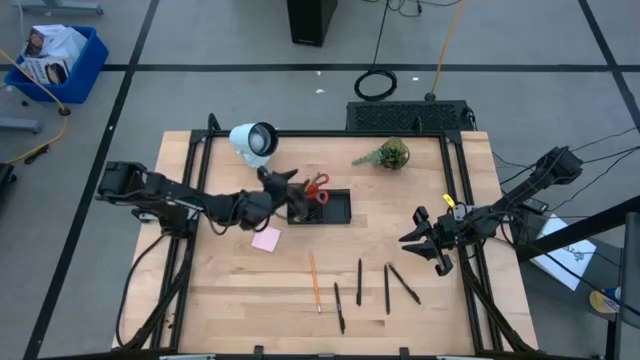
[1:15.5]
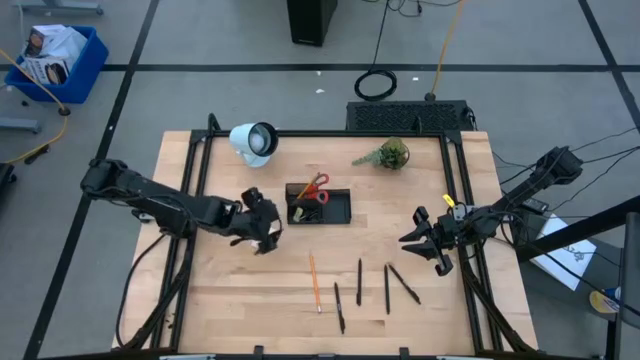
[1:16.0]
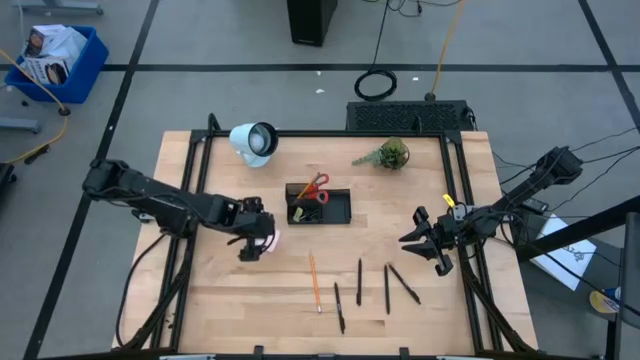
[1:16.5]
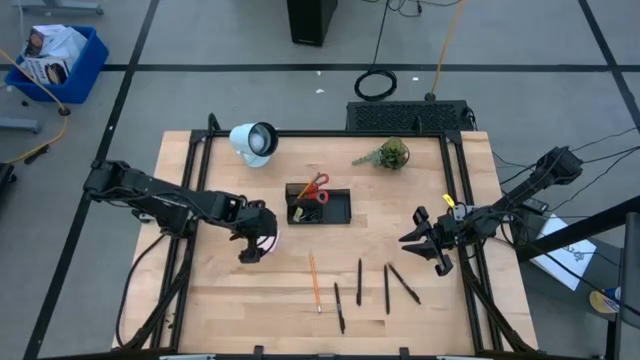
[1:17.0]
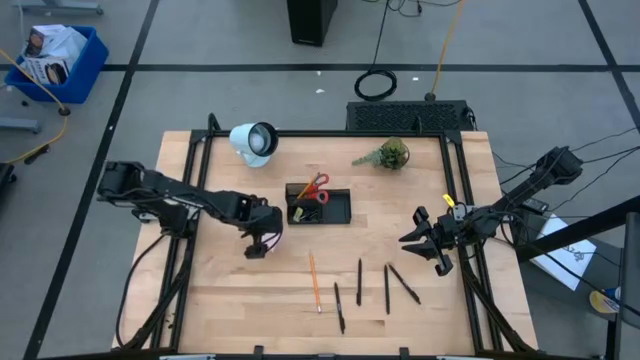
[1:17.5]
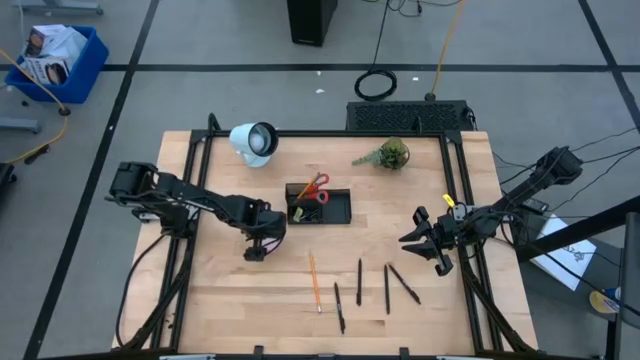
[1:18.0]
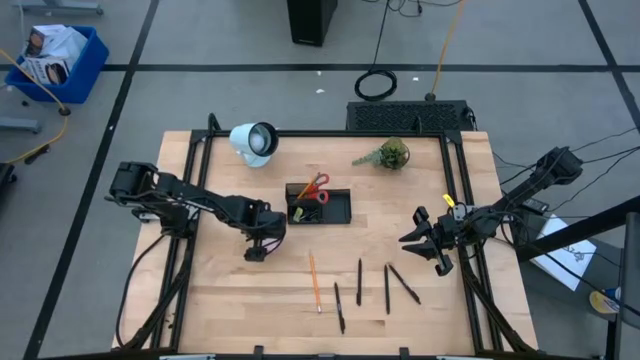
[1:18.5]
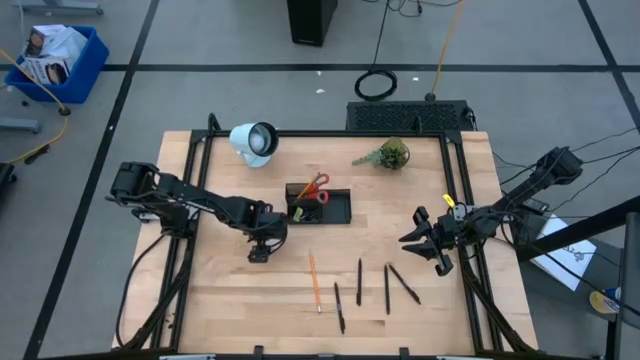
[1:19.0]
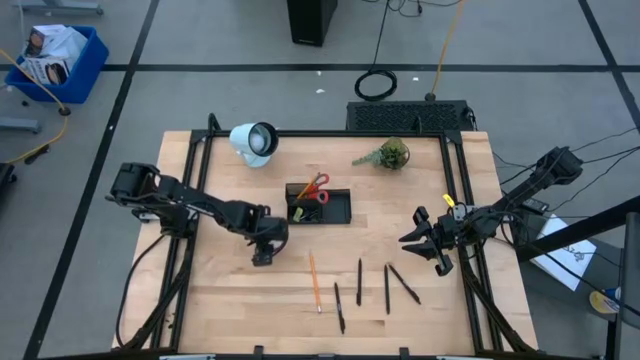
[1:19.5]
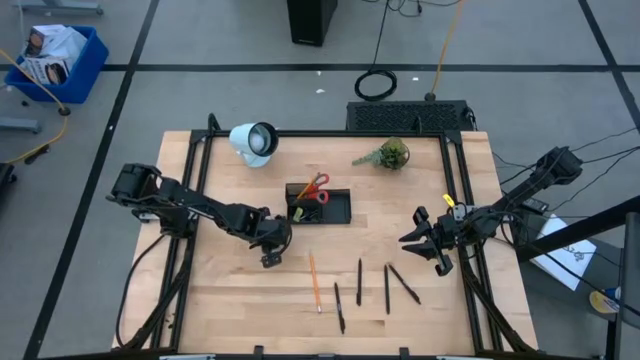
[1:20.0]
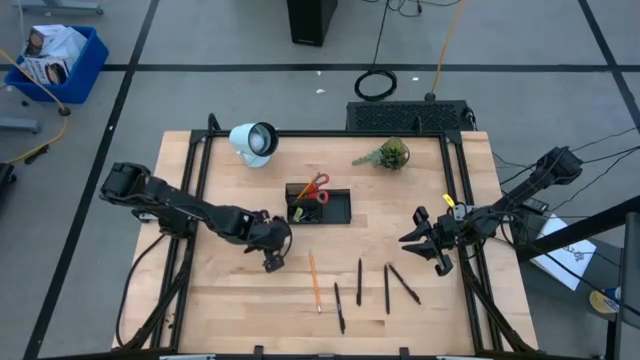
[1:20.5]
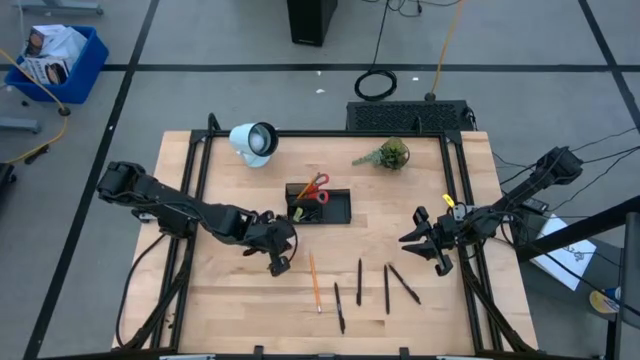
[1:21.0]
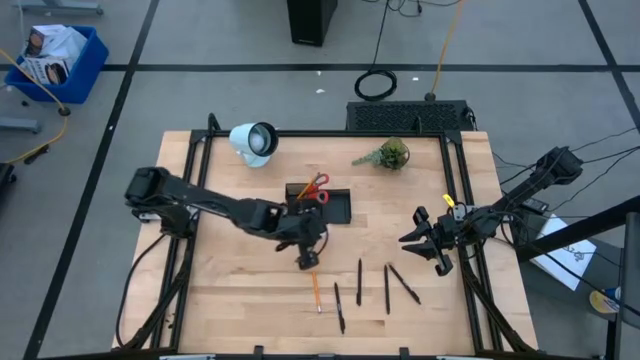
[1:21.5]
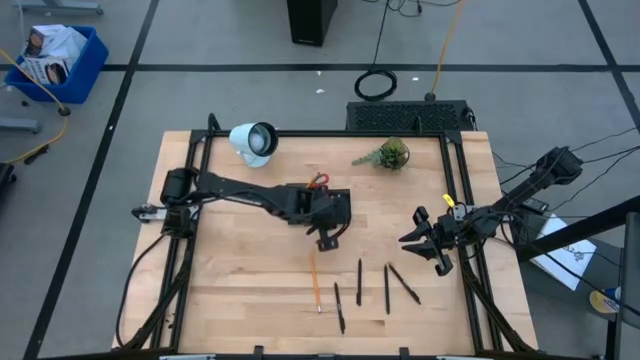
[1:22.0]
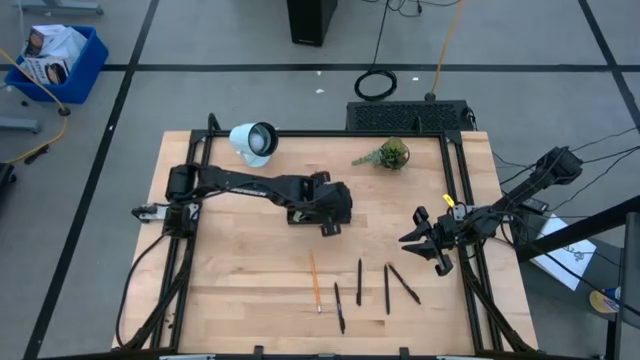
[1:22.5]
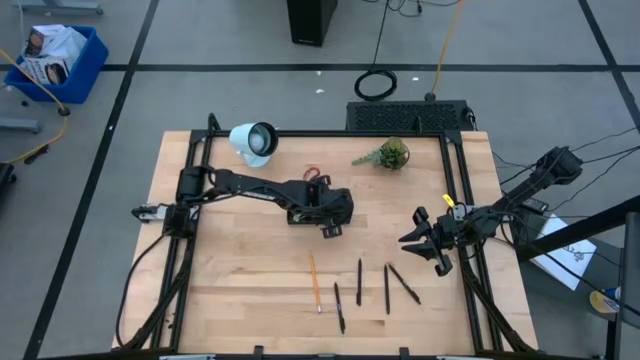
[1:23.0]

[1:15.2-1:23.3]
Task: Pick and place office supplies into organizer
Put the pink sticky notes into the black desk organizer

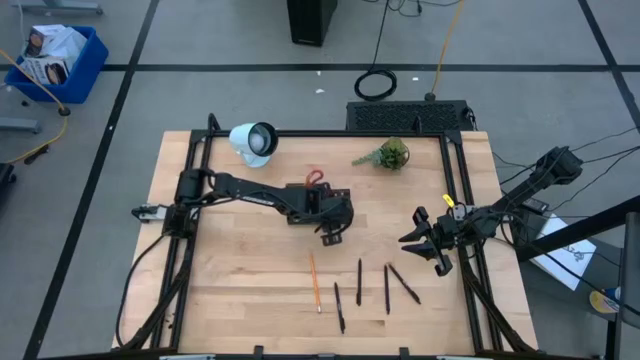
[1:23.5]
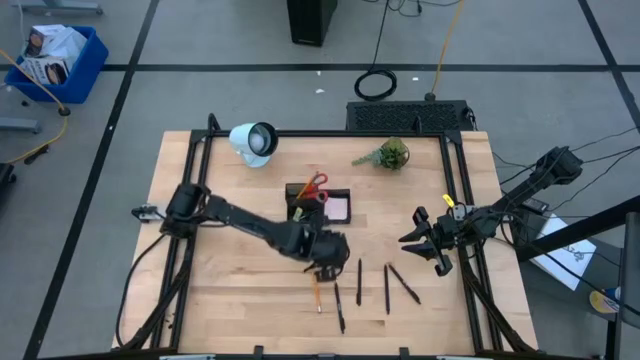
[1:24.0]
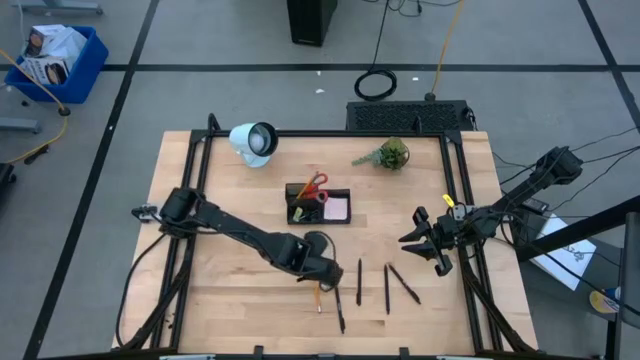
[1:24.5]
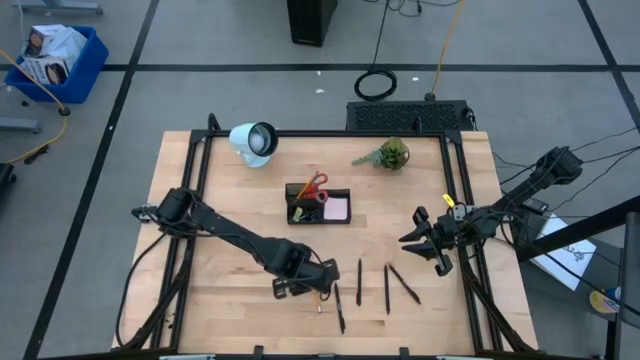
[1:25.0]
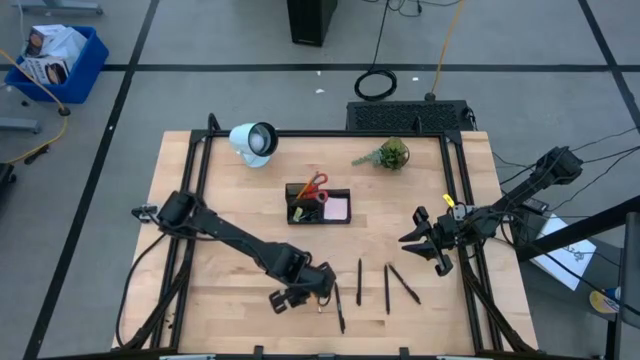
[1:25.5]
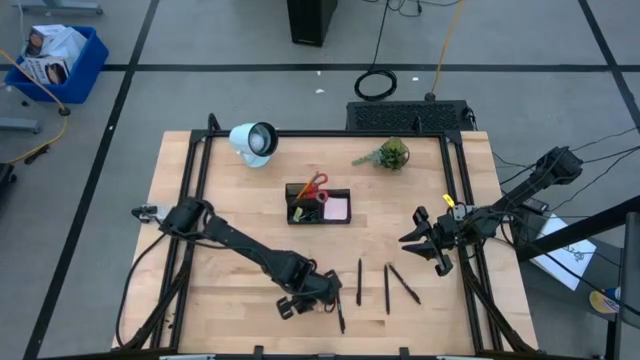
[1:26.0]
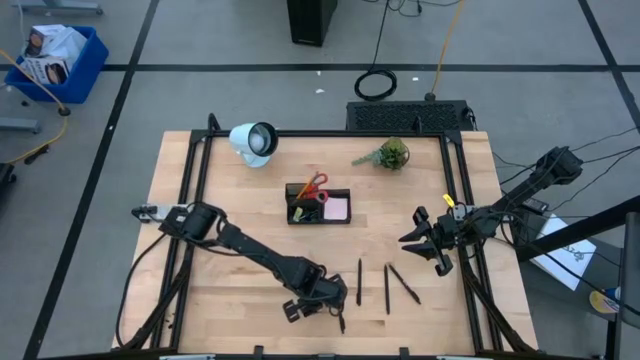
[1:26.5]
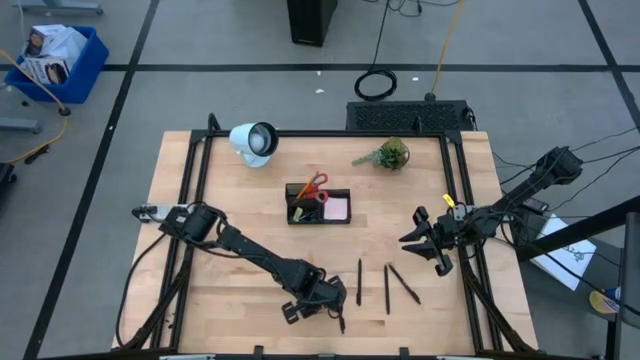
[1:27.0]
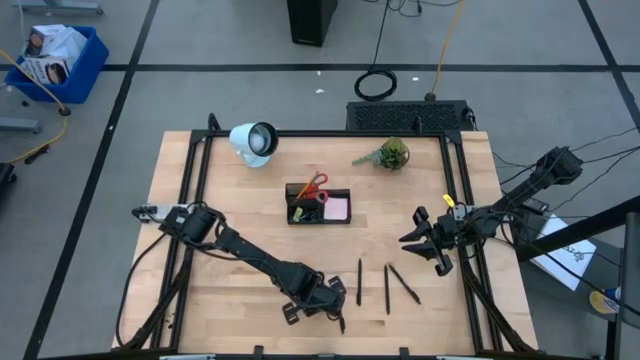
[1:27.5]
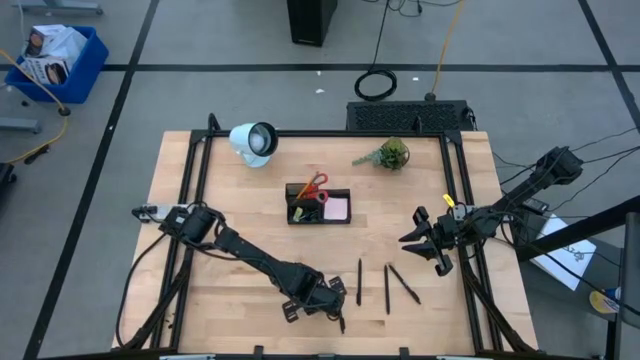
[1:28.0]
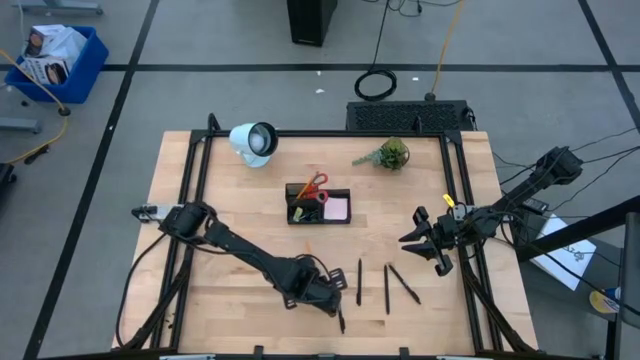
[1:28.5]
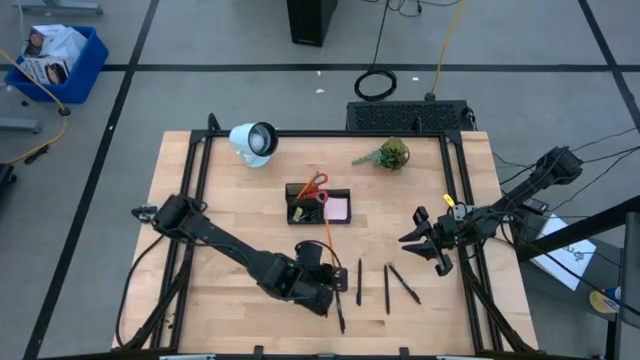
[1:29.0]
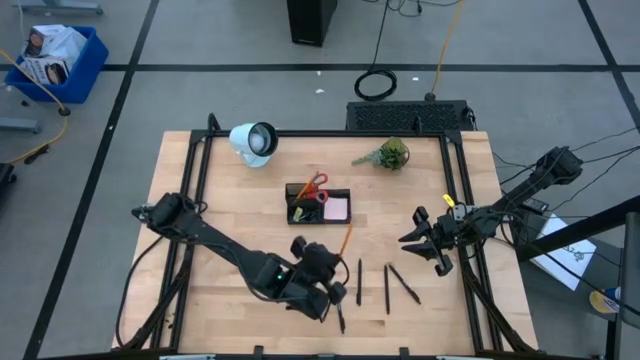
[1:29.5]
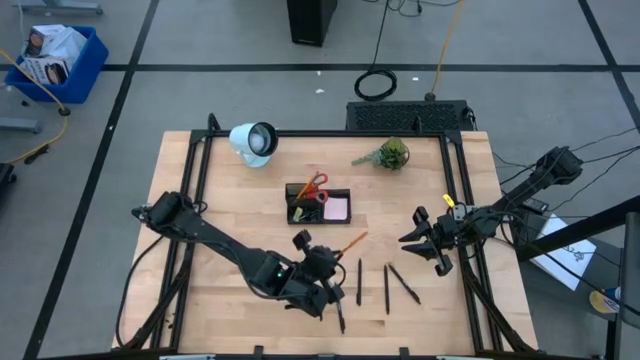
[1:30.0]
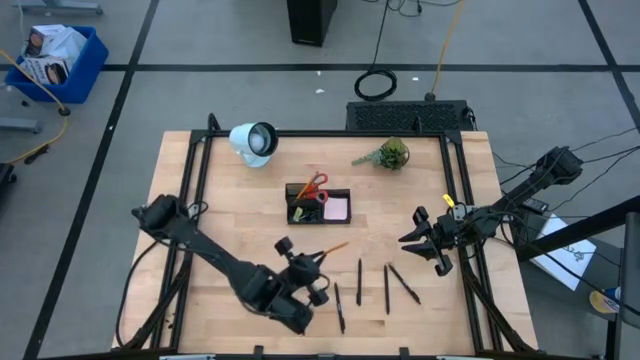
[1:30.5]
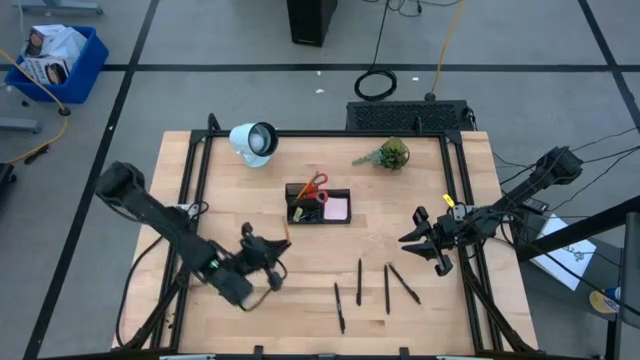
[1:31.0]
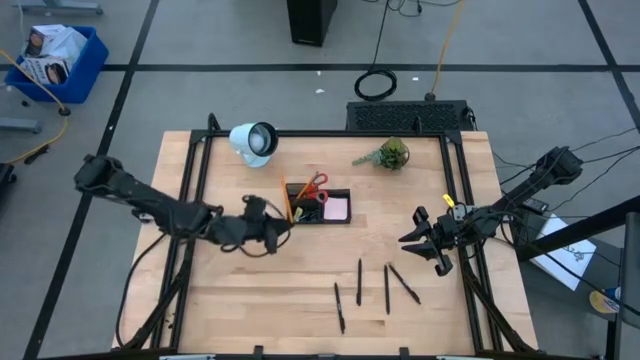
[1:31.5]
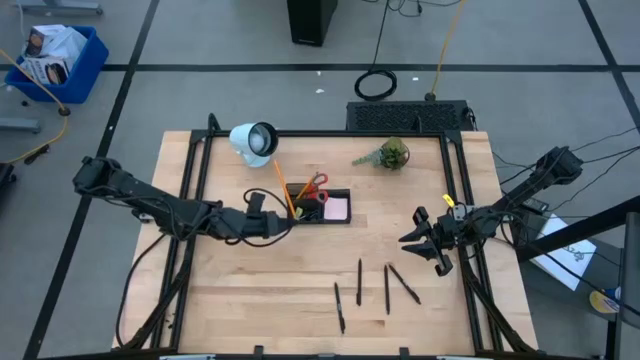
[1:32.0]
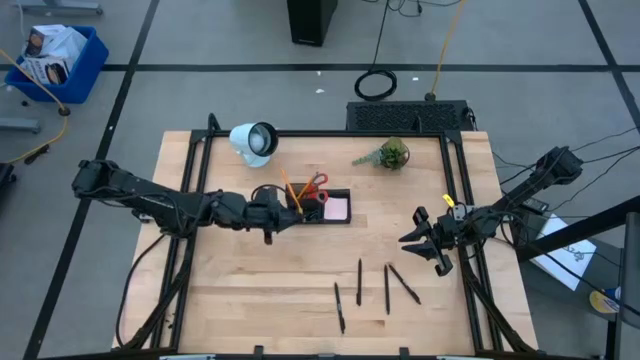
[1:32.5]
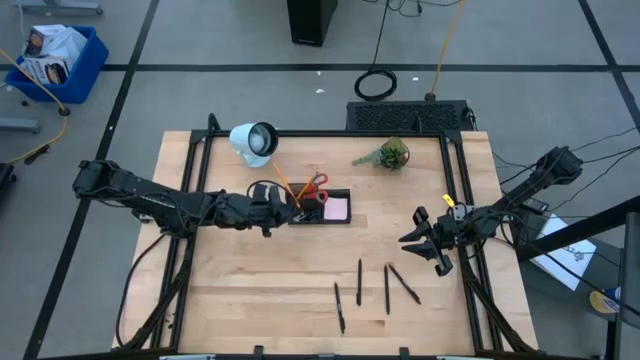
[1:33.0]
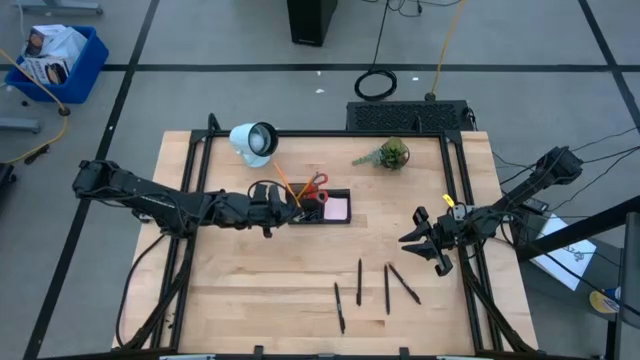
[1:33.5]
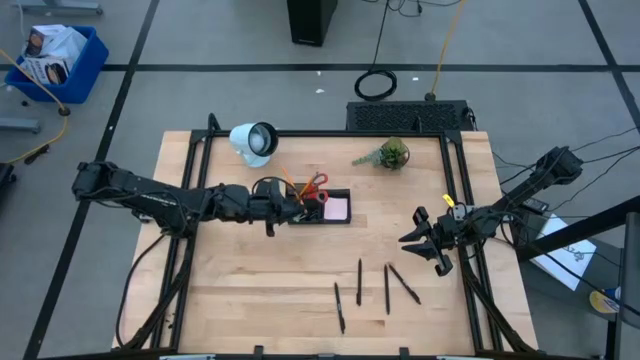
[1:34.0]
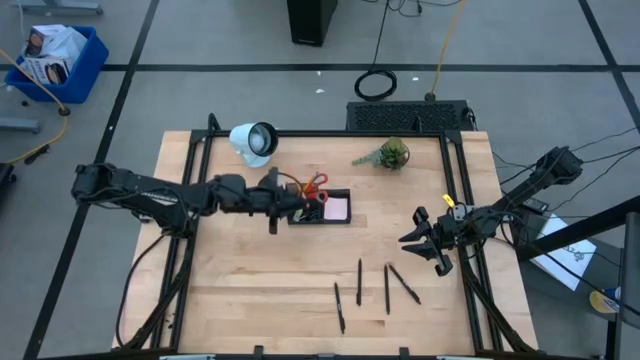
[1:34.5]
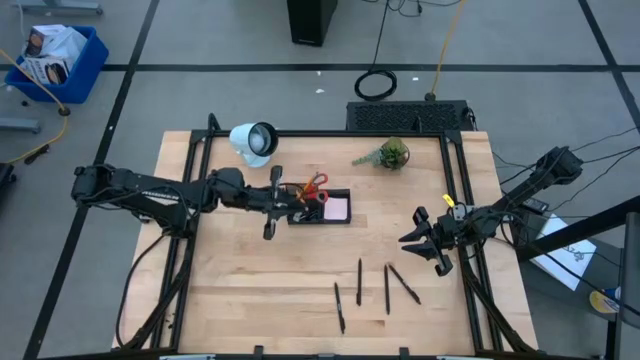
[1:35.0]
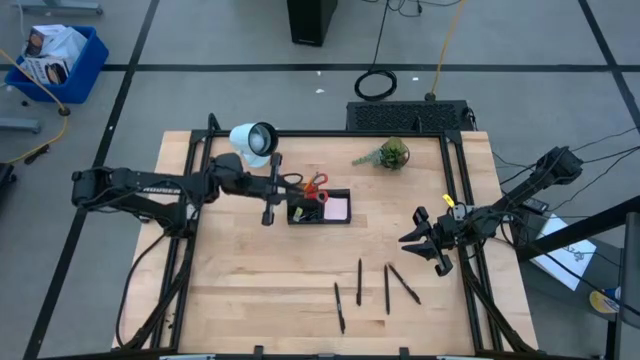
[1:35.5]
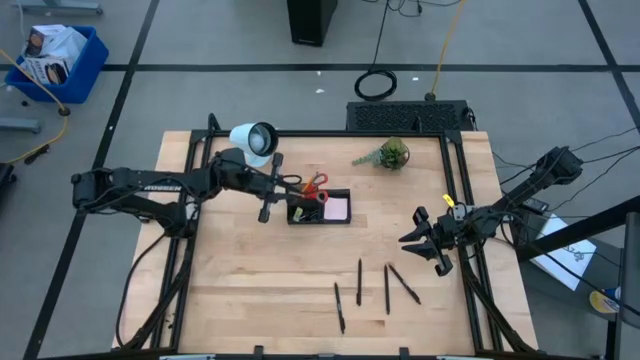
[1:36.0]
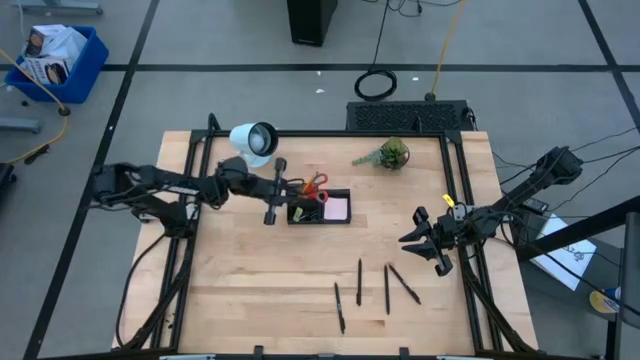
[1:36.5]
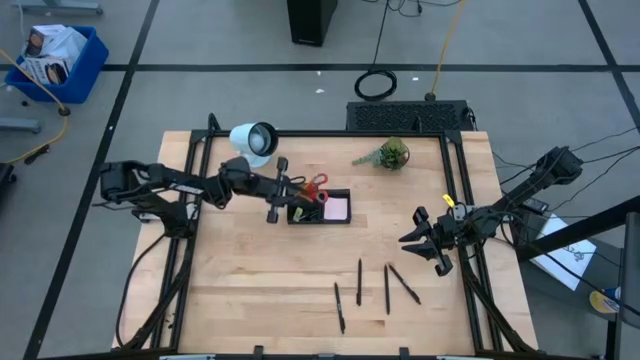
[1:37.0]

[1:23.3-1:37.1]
Put the orange pencil into the black desk organizer
